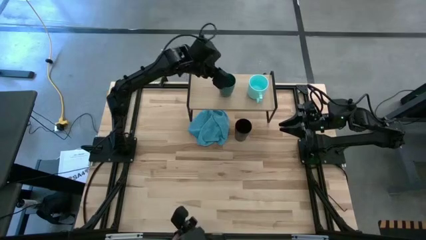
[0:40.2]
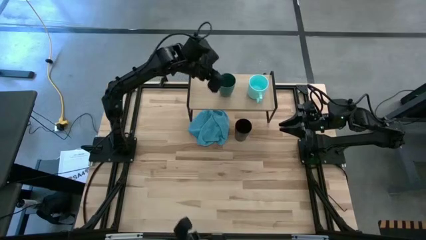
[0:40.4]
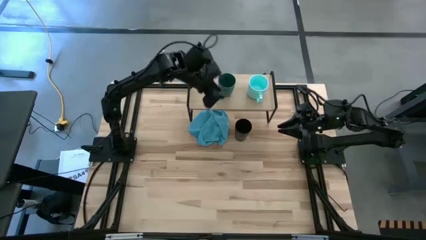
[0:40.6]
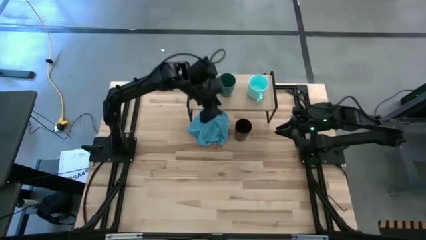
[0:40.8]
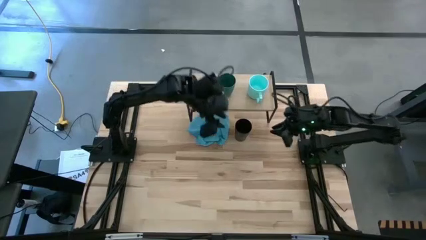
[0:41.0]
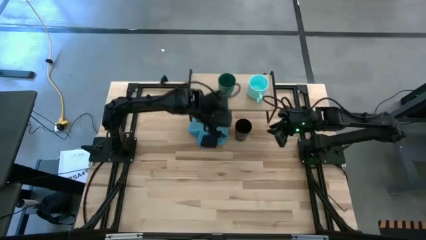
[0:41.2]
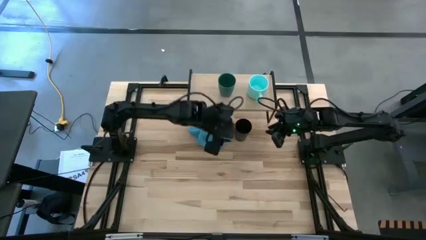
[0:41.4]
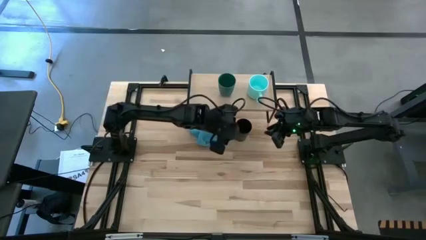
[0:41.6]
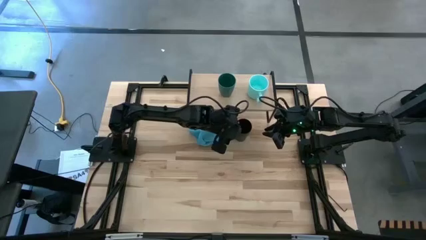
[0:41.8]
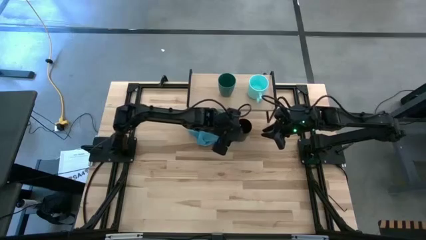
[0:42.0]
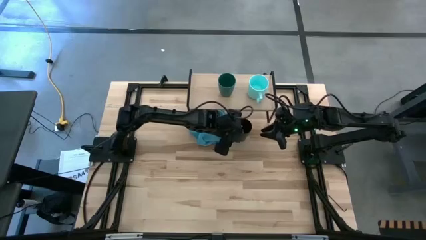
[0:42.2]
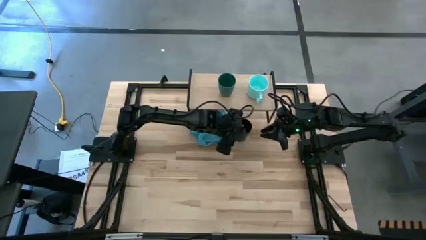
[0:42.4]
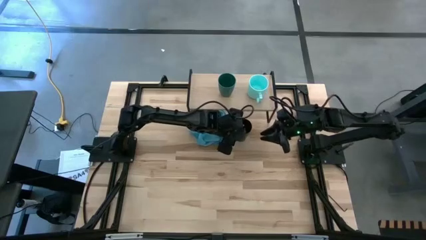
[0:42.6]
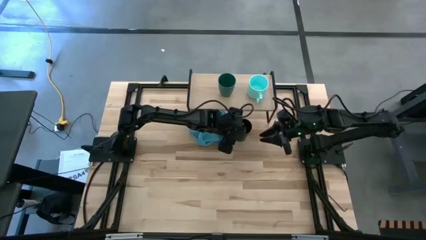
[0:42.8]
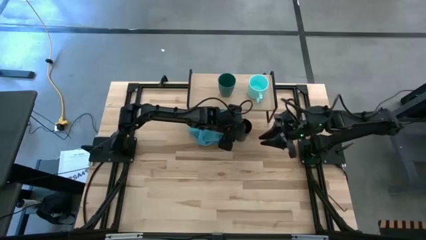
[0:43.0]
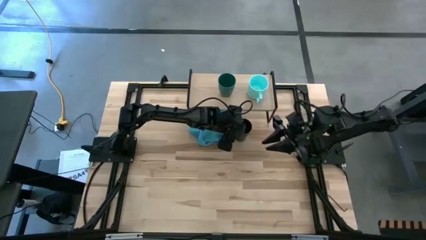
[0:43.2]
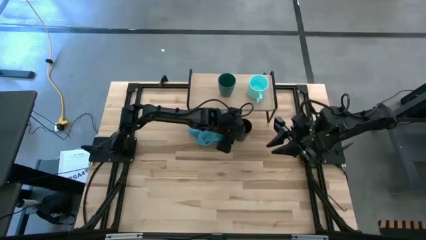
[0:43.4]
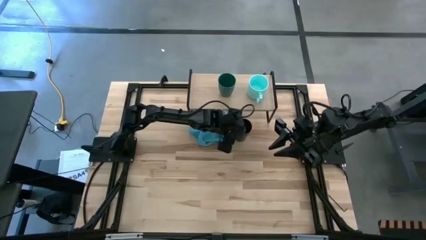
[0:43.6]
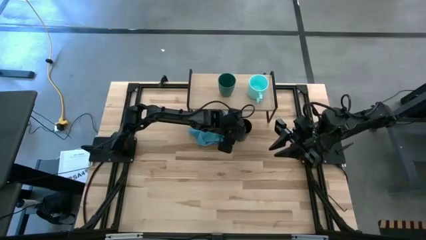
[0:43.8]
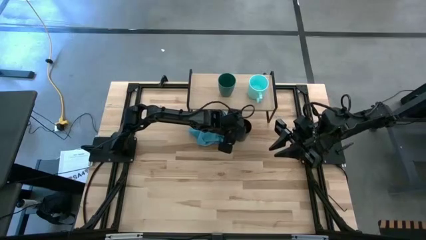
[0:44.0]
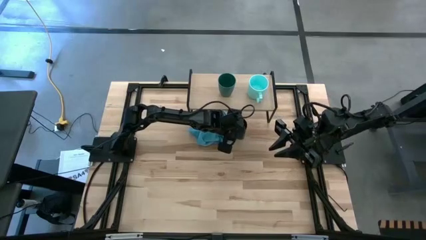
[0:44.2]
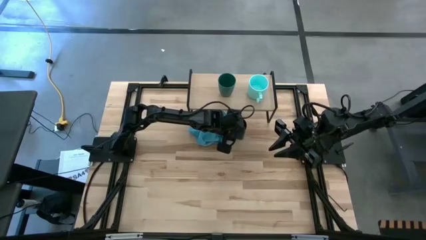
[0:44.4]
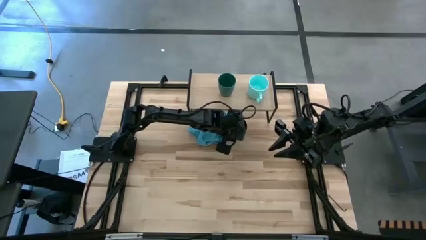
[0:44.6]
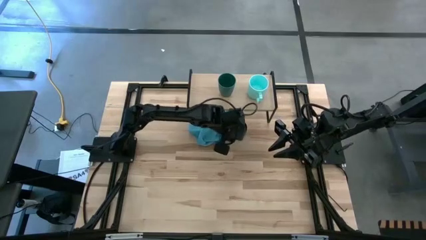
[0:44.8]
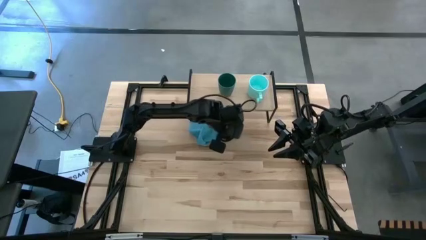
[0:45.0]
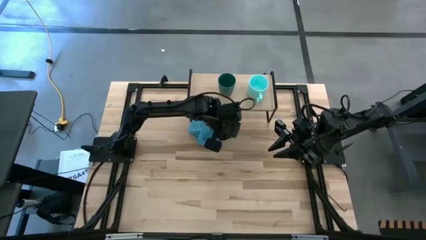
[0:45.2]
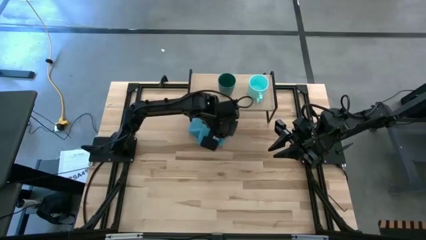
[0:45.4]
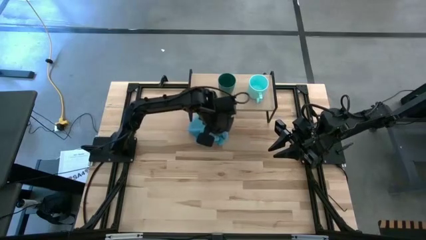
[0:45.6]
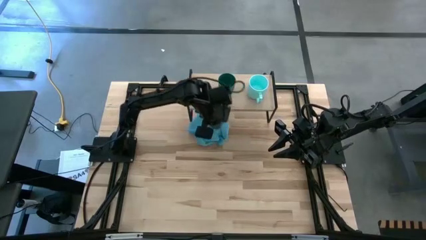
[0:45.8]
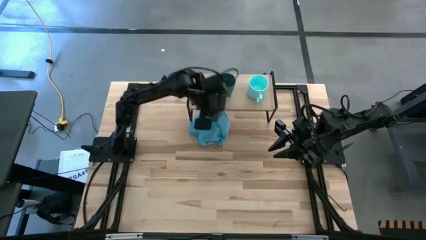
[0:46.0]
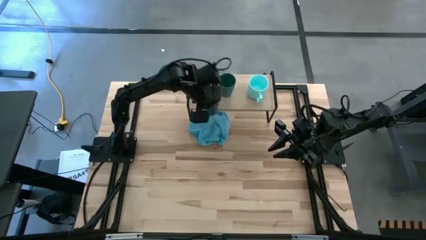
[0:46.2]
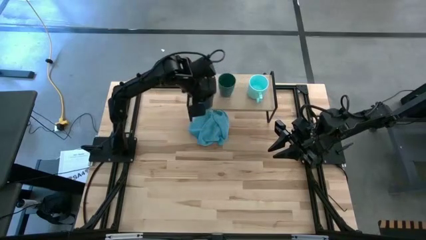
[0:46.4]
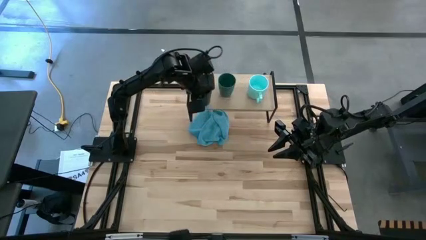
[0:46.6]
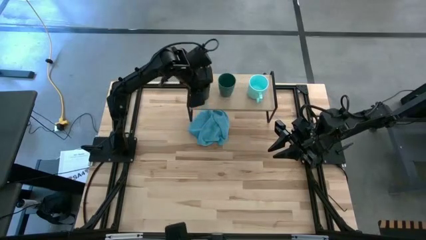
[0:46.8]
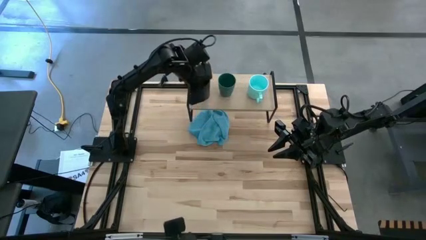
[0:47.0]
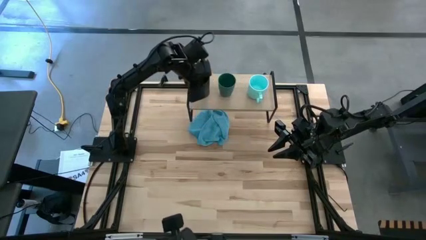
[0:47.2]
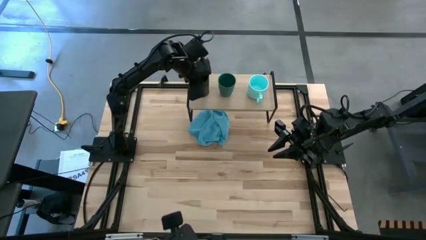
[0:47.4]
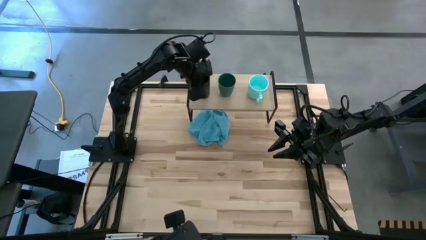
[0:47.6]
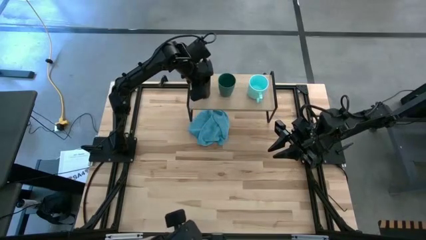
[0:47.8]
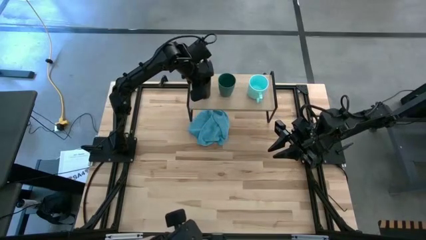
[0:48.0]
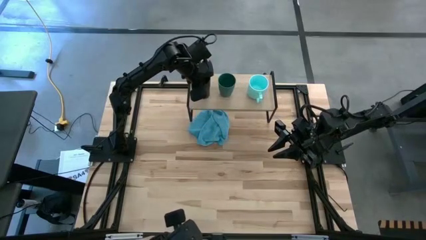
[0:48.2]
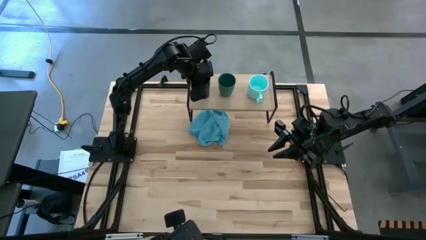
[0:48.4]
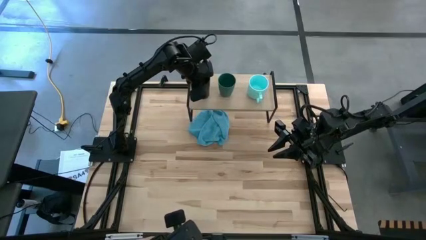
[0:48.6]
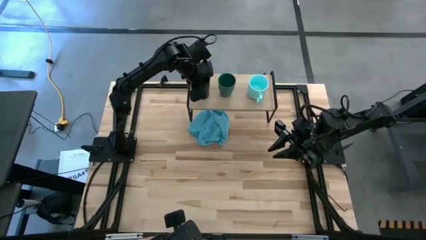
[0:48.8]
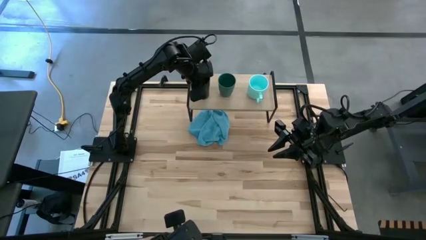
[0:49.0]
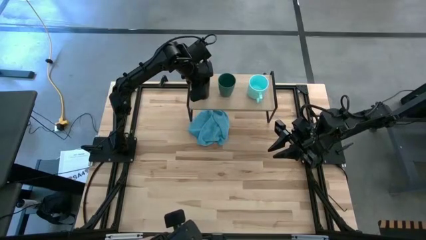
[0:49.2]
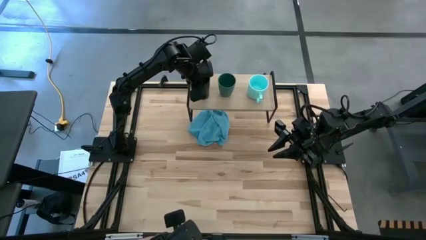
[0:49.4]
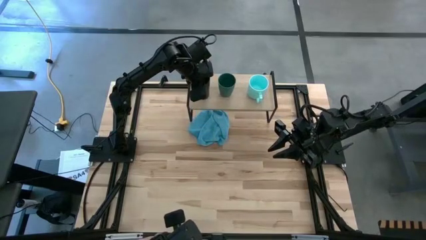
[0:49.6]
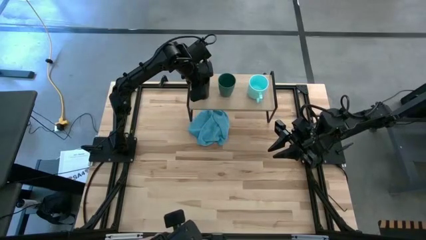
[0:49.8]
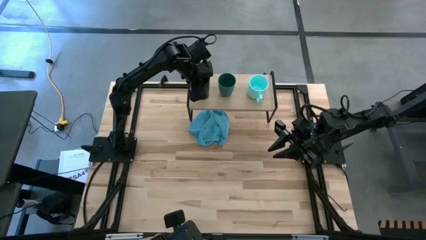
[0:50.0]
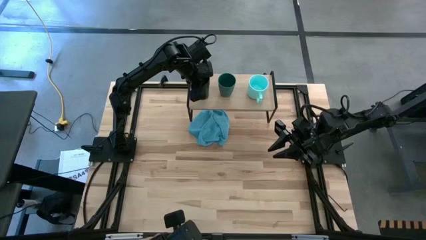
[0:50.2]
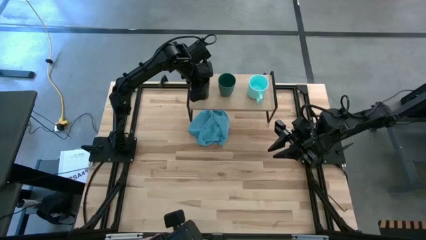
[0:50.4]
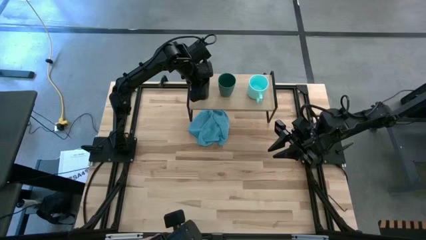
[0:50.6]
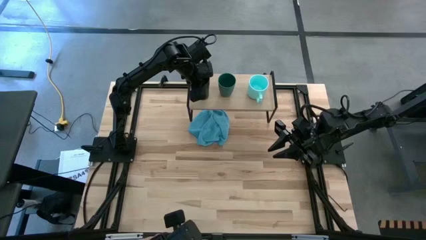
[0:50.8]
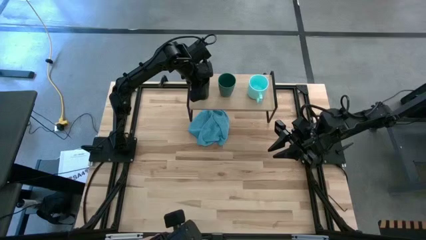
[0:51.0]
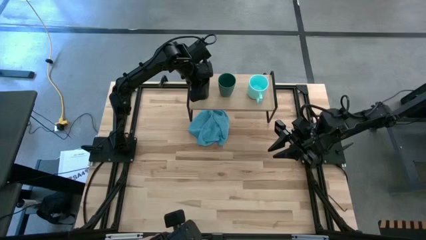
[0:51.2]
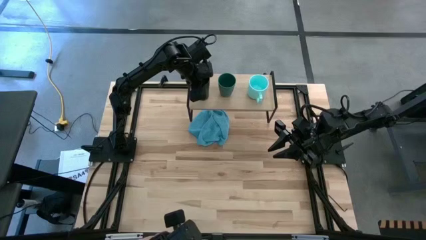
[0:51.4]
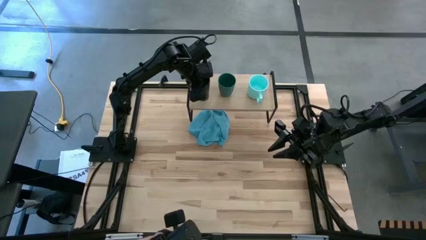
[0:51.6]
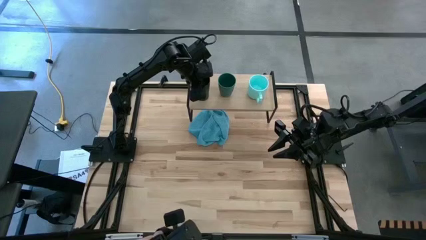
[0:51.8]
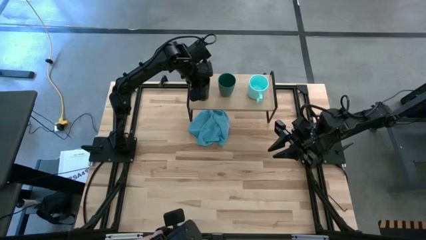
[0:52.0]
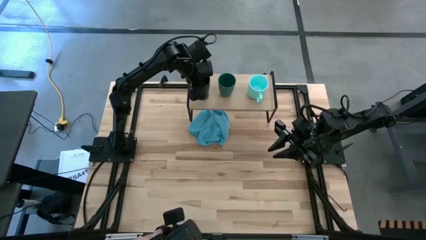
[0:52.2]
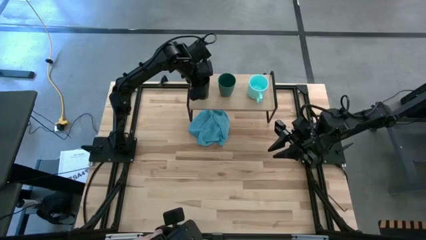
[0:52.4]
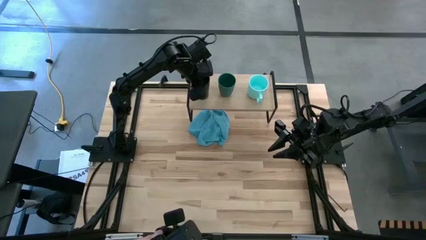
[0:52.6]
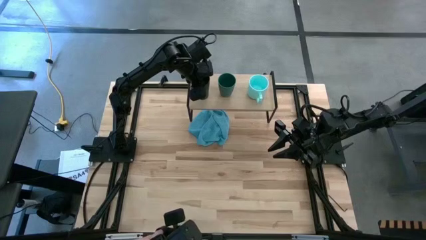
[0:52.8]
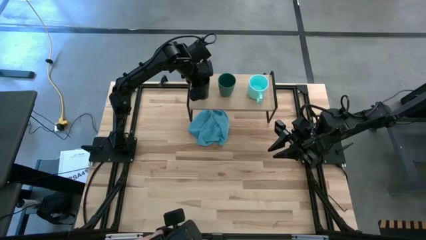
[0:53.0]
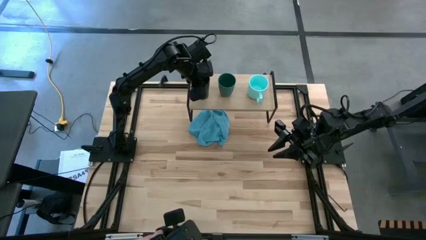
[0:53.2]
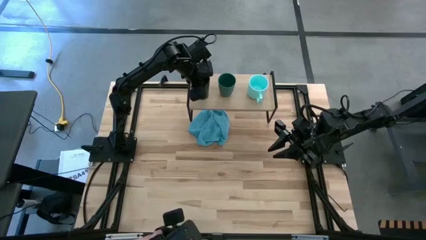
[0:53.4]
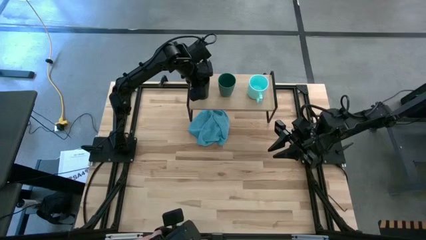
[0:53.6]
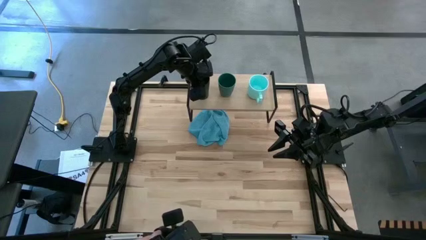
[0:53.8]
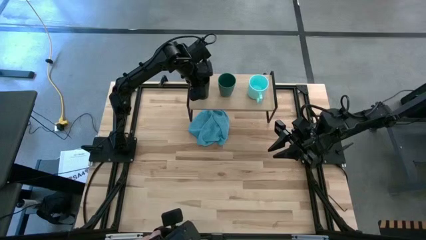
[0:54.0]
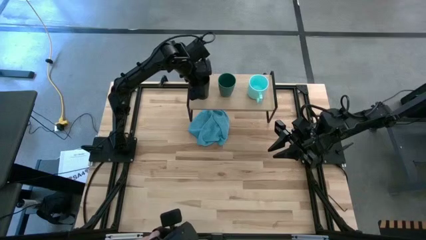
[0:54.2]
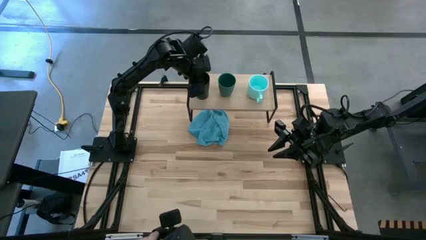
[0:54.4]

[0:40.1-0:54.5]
Task: Stack small to large cups/mugs on shelf
Put the black cup on the shelf
